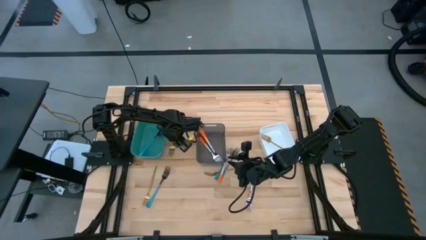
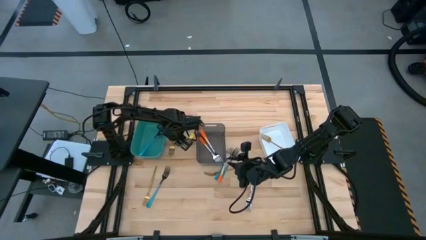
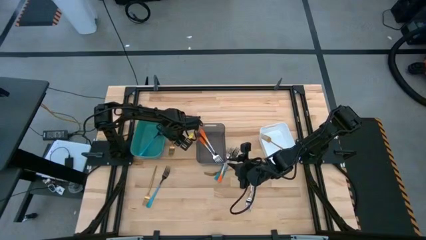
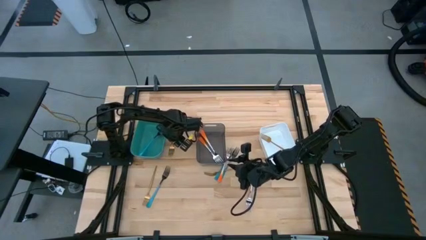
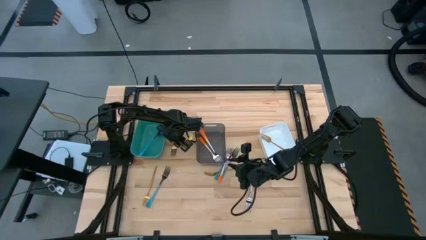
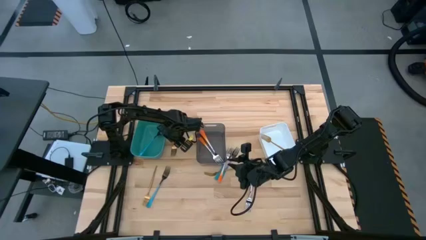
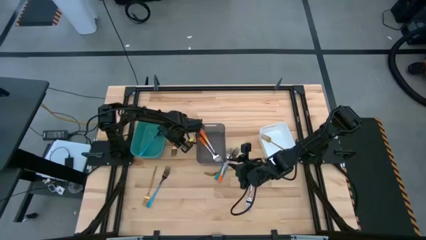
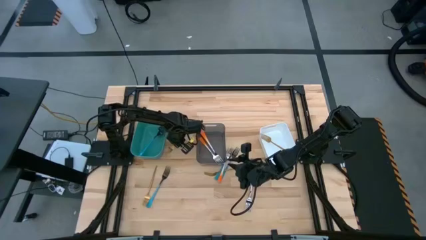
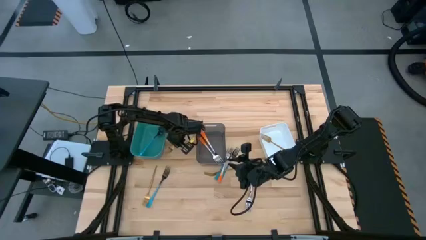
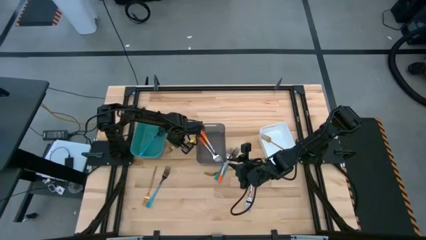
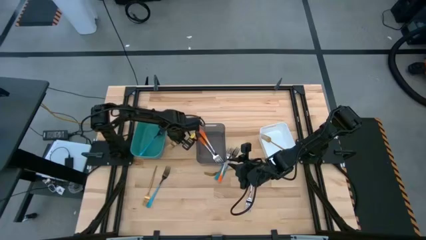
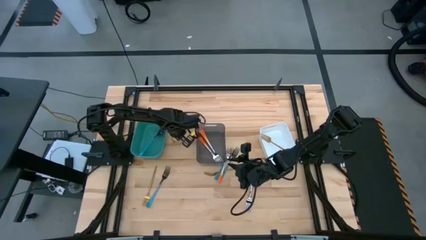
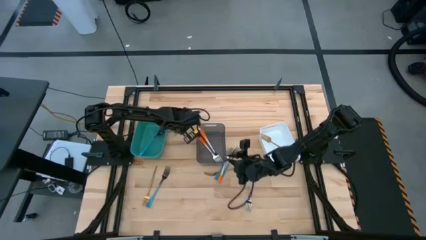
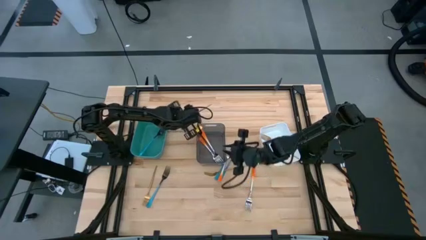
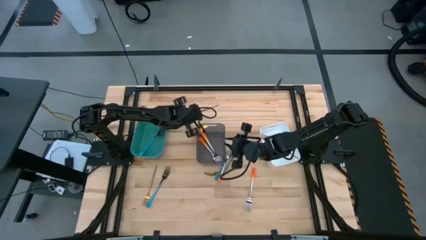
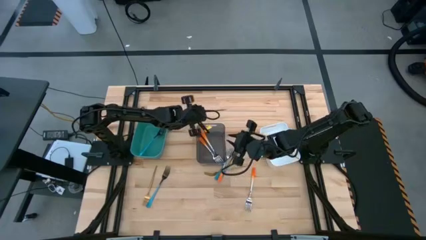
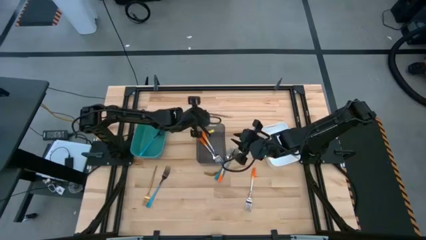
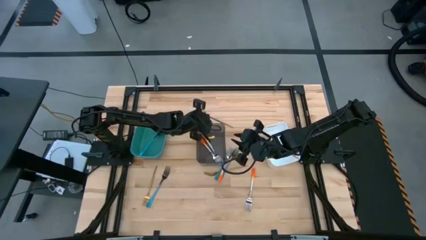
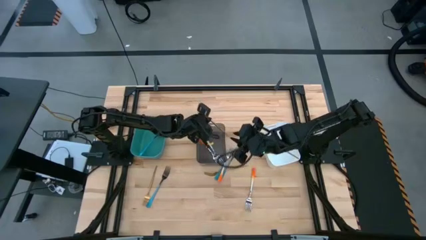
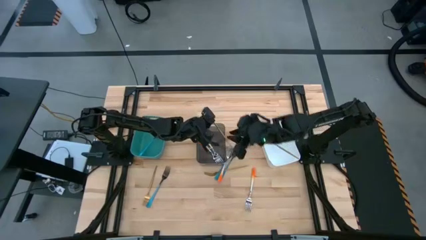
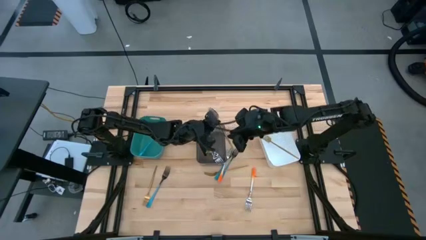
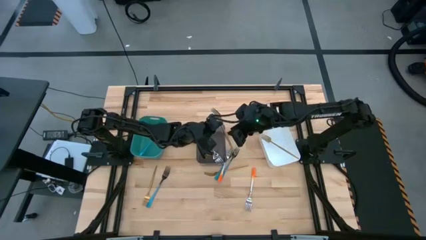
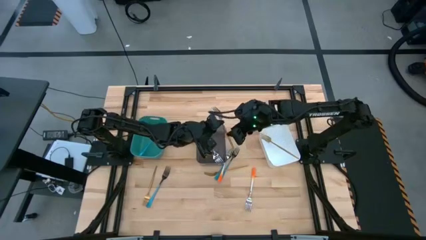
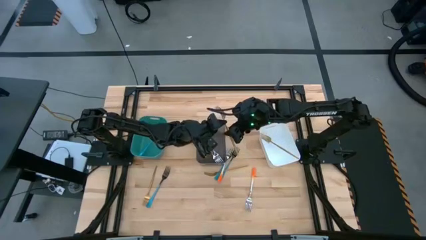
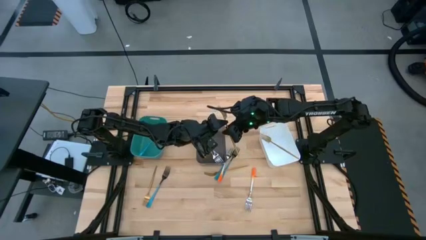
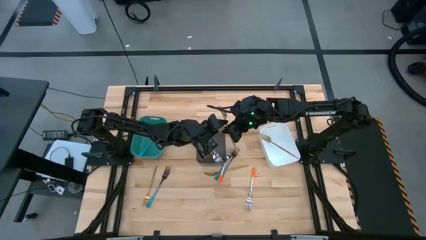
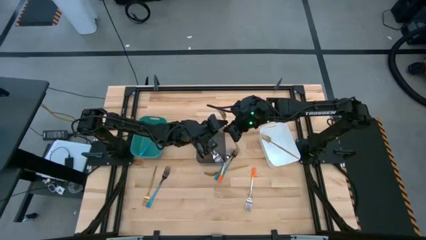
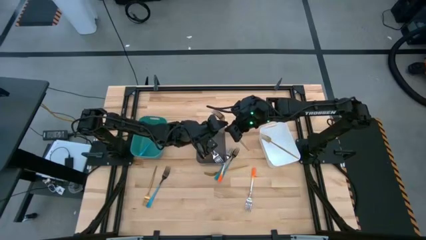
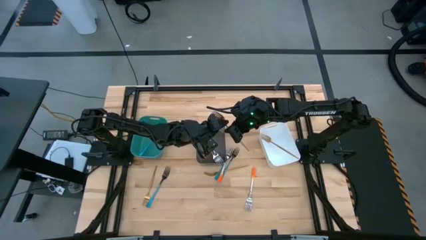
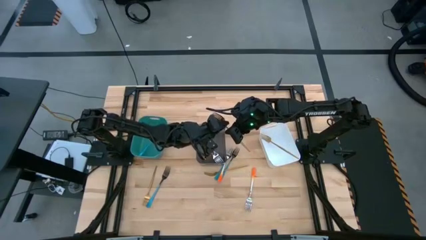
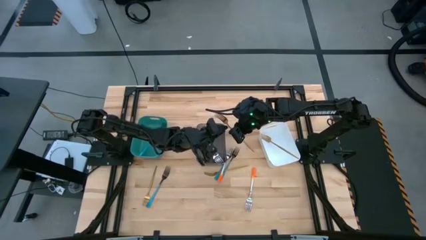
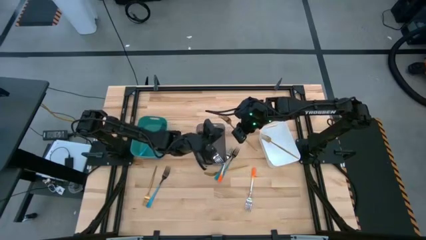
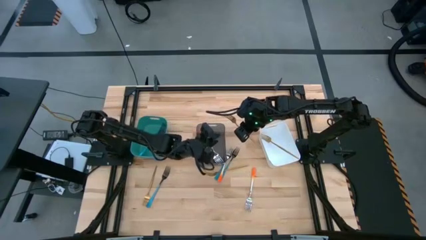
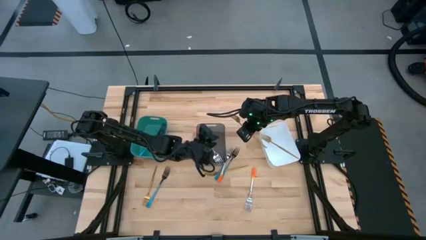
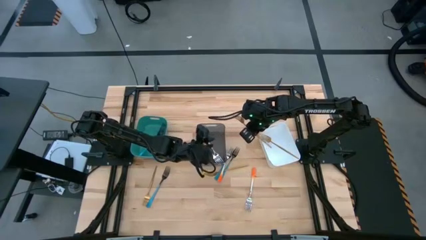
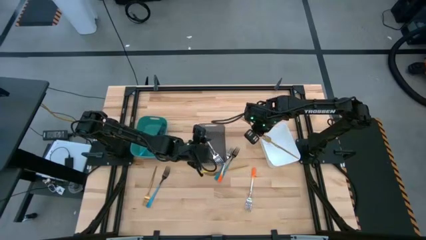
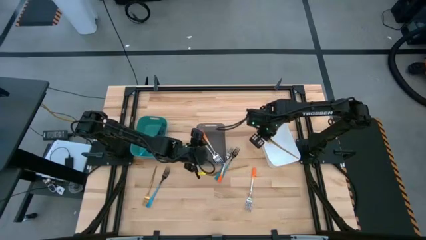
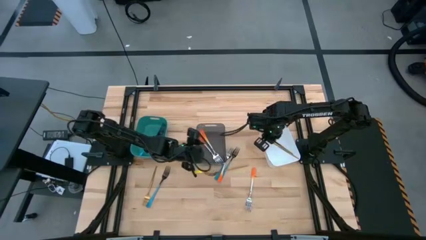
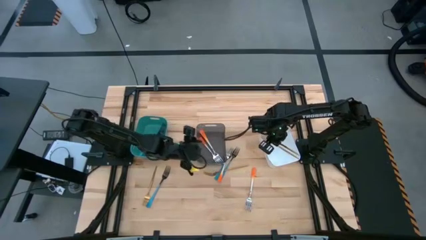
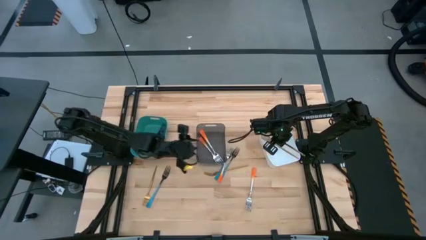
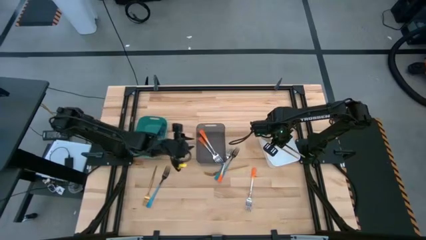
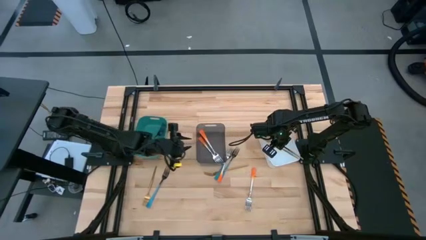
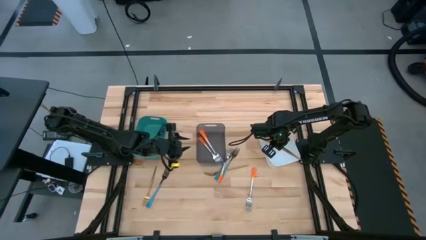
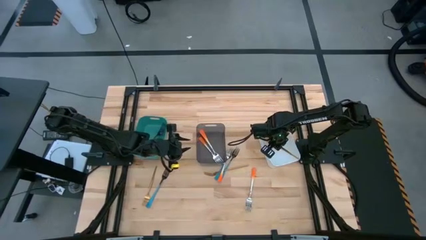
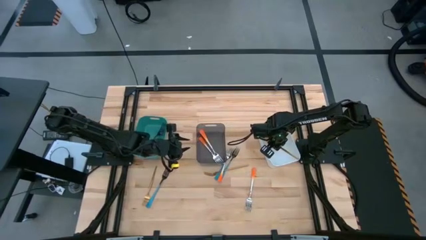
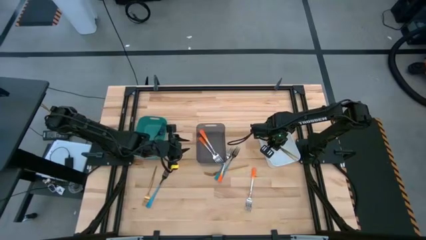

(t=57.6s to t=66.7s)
Task: Sort silverware by color (type)
Put the gold fork into the white bin

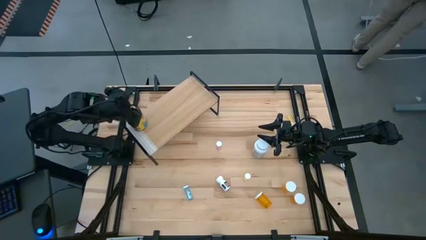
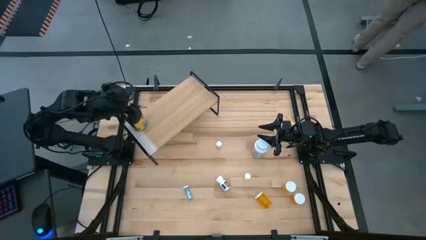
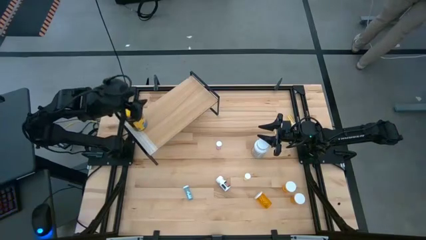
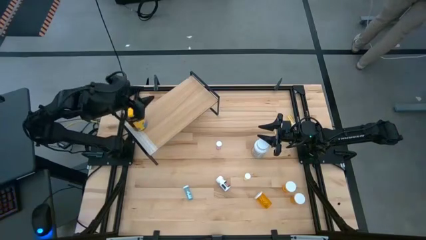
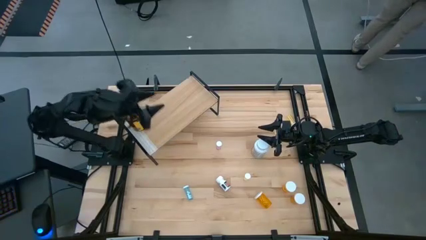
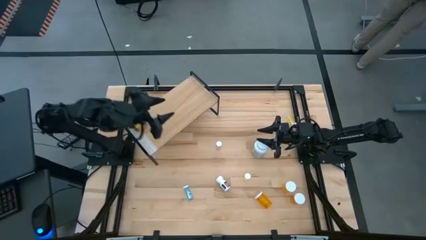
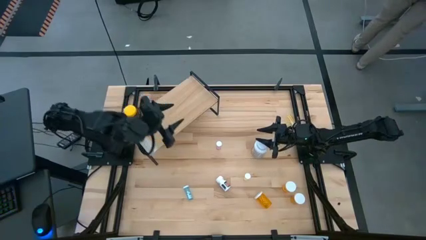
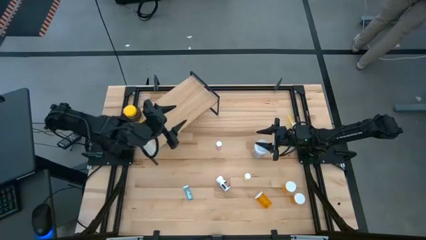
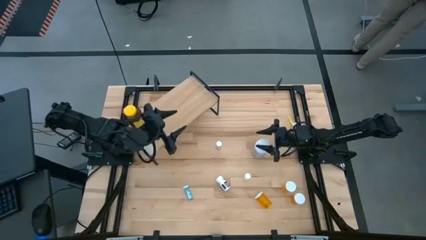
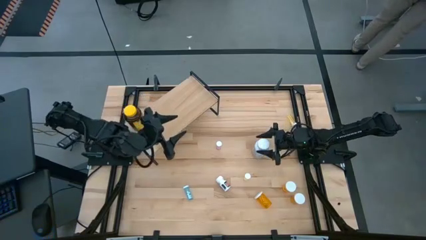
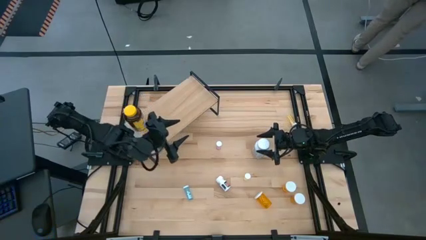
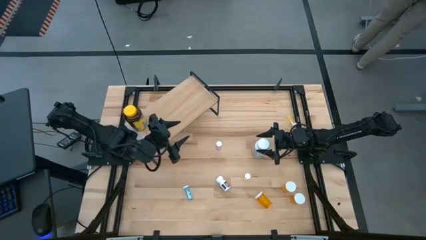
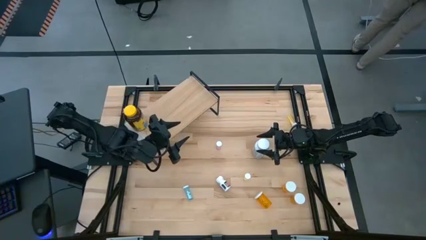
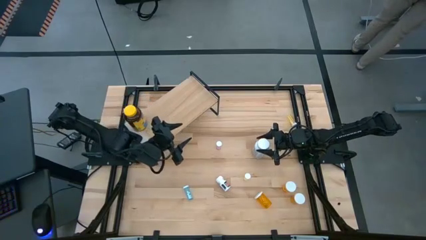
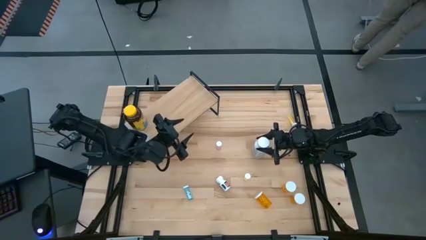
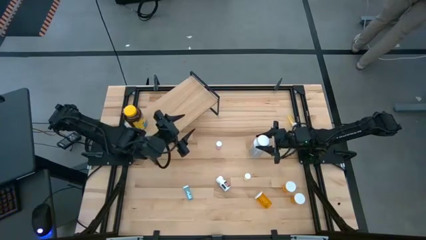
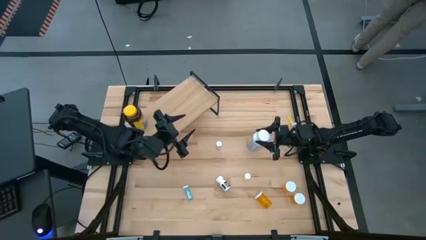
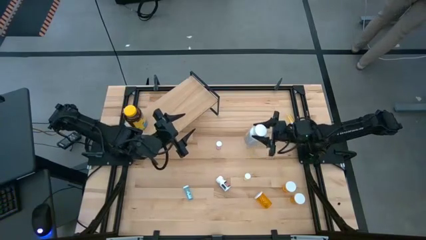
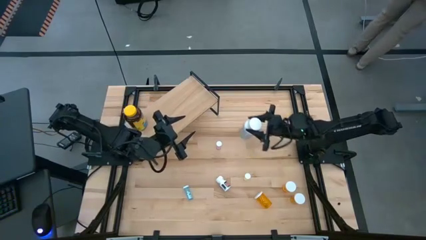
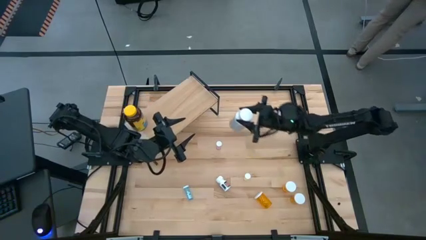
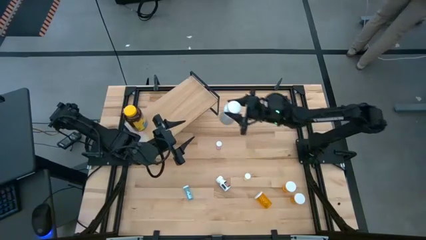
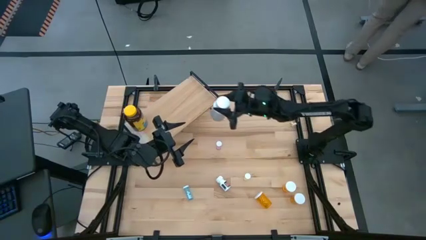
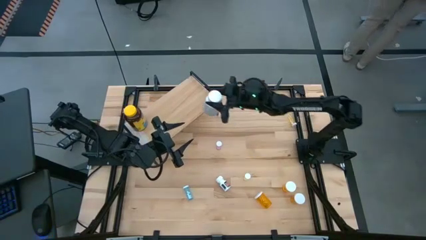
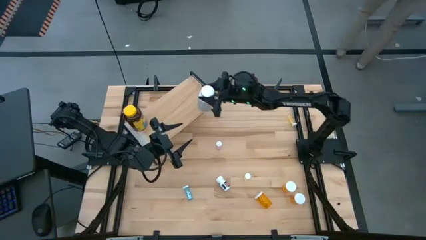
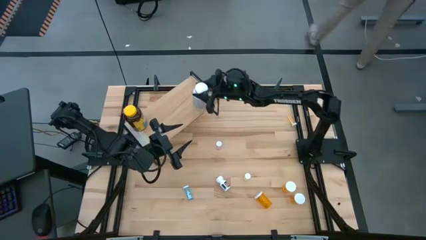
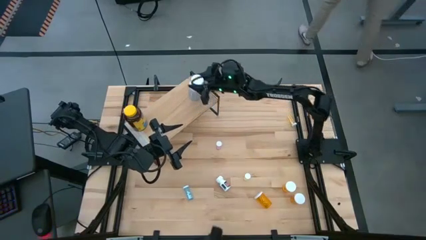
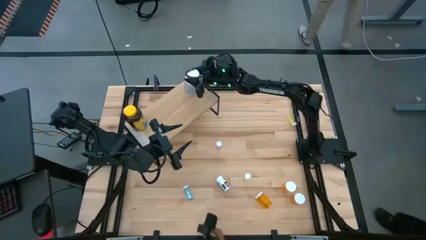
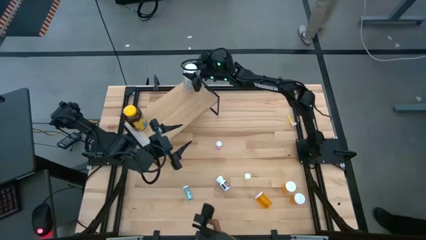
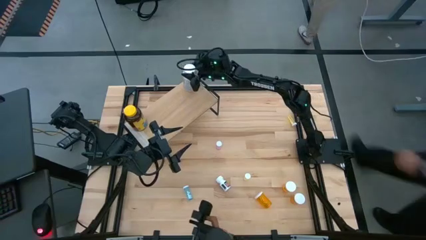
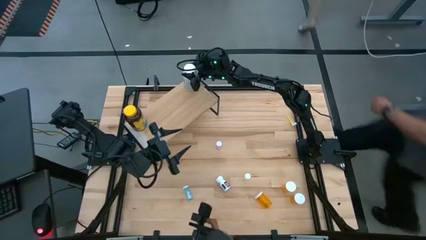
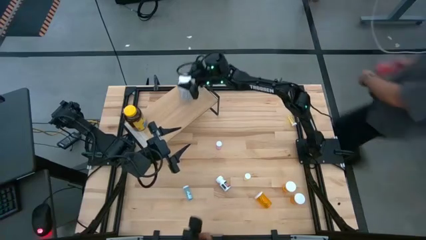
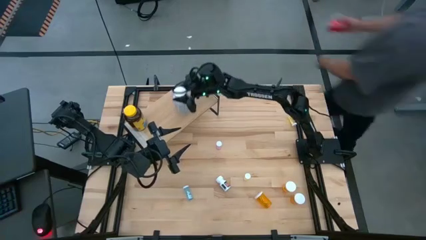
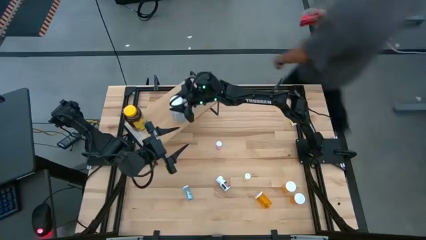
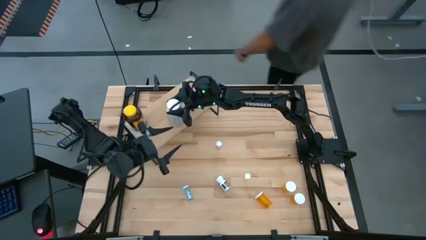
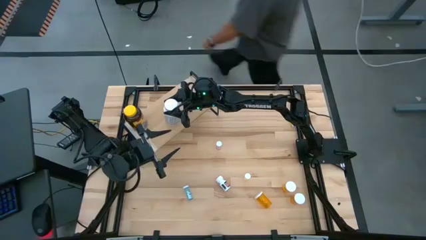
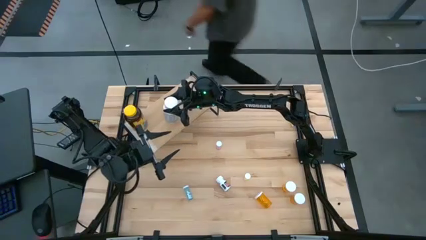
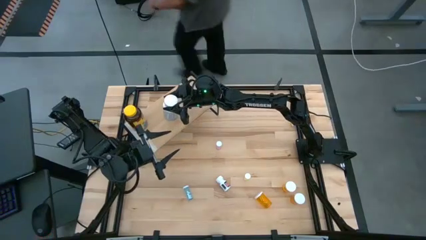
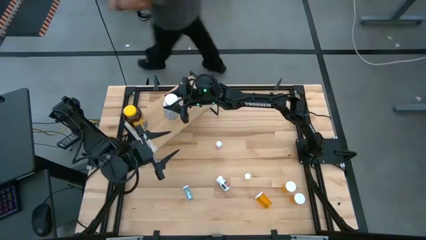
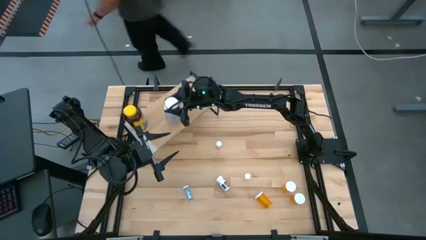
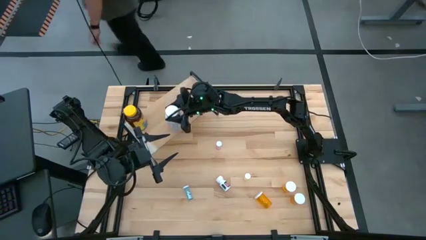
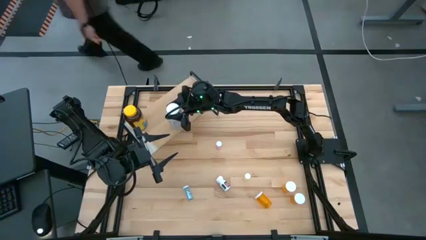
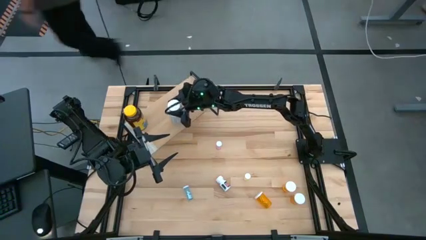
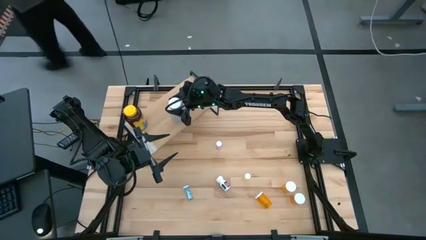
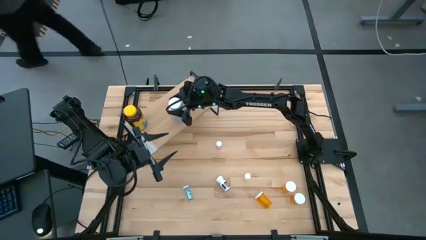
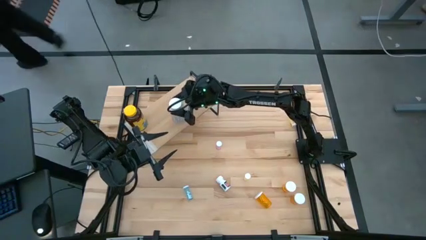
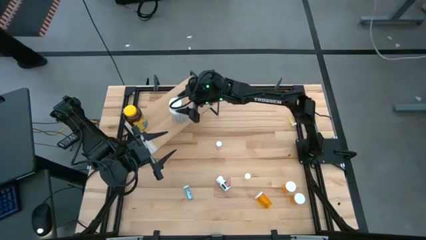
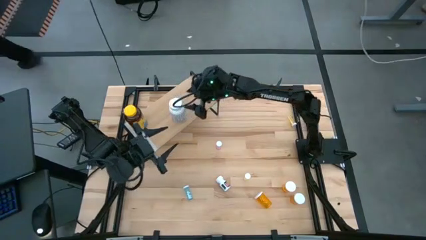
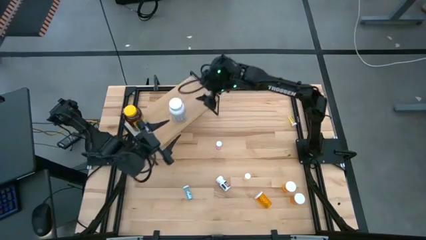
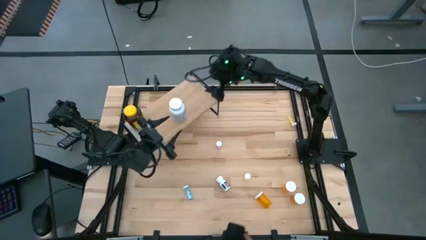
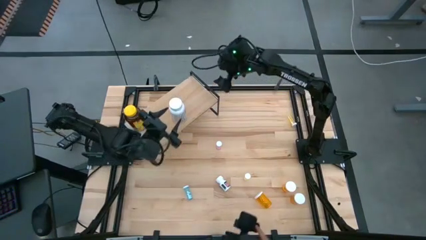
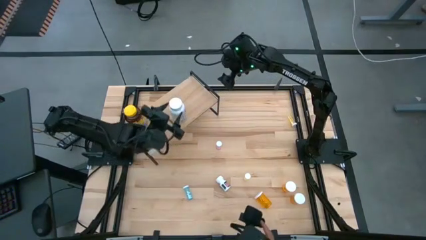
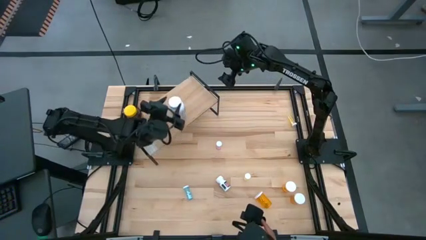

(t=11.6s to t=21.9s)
Task: Pick and place medicine bottles onto shelf by color
Put the large white pill bottle on the shelf
